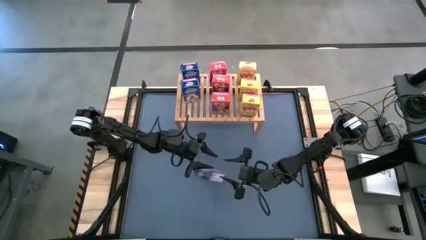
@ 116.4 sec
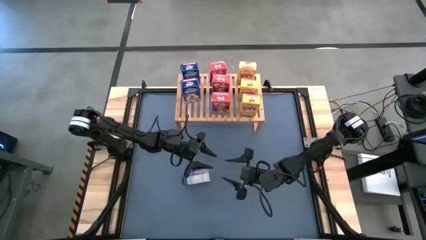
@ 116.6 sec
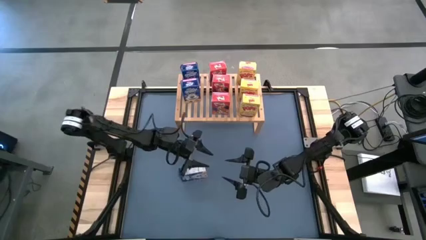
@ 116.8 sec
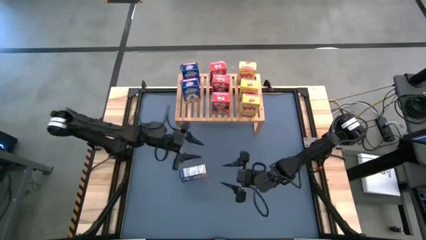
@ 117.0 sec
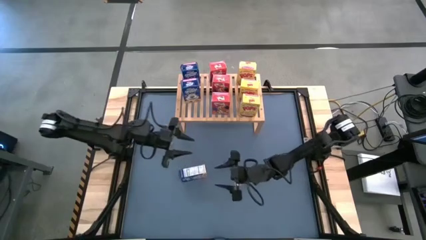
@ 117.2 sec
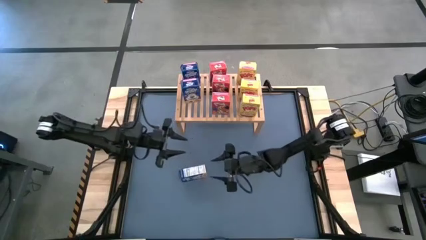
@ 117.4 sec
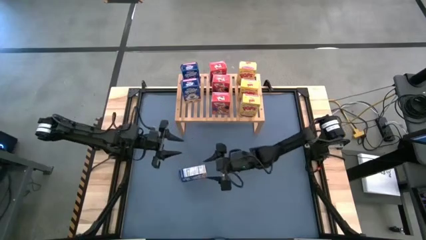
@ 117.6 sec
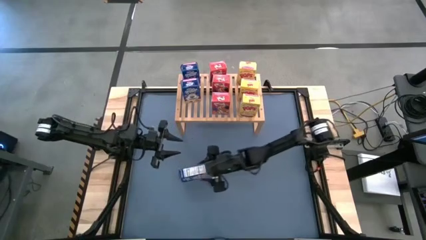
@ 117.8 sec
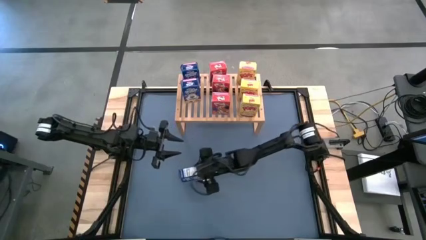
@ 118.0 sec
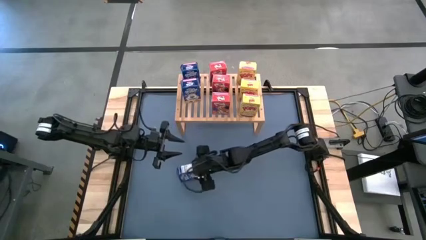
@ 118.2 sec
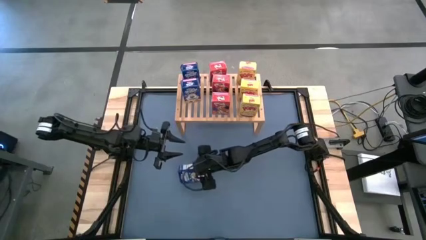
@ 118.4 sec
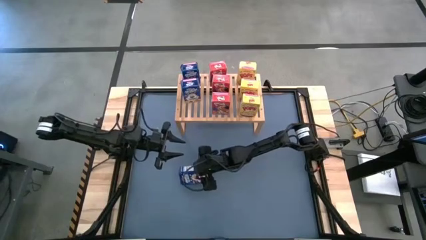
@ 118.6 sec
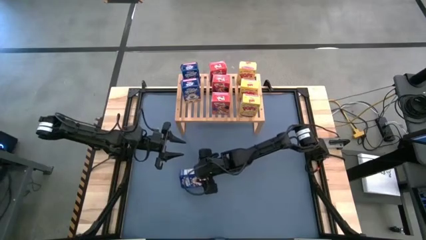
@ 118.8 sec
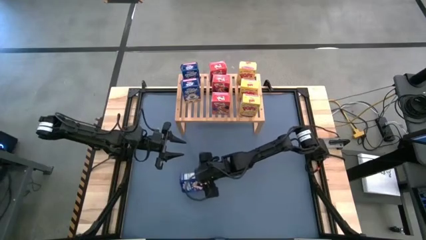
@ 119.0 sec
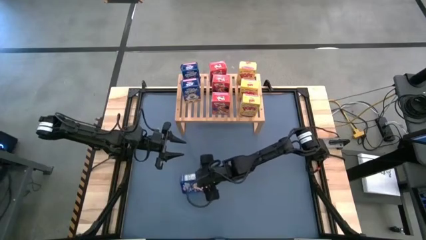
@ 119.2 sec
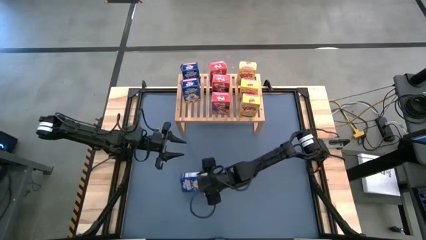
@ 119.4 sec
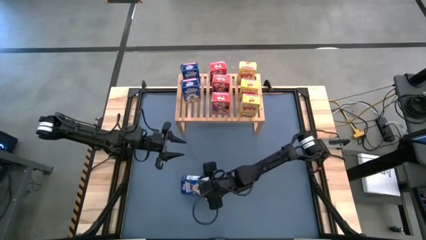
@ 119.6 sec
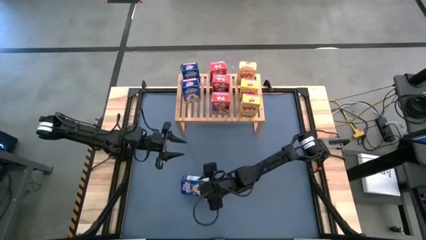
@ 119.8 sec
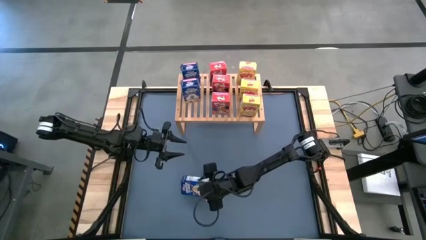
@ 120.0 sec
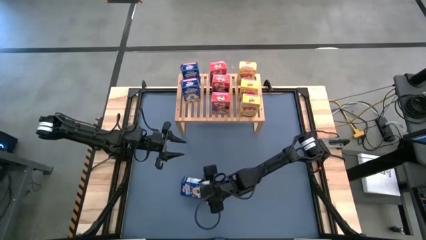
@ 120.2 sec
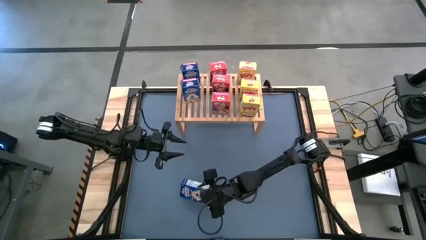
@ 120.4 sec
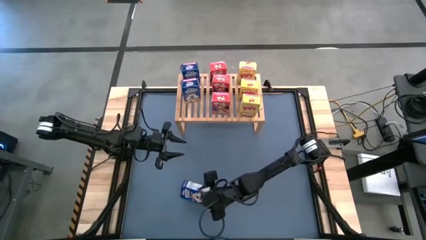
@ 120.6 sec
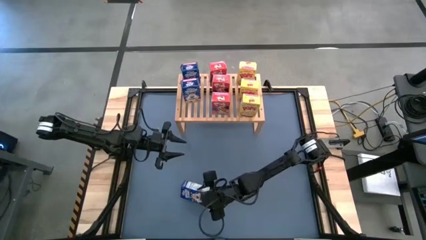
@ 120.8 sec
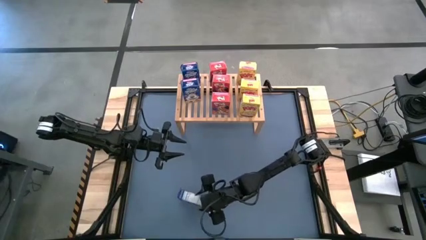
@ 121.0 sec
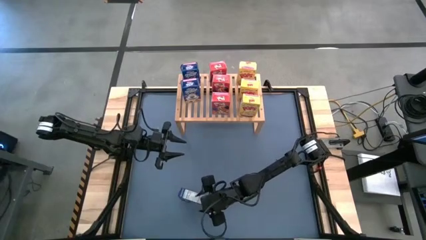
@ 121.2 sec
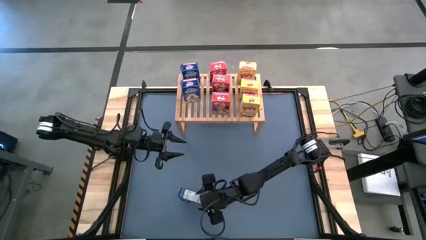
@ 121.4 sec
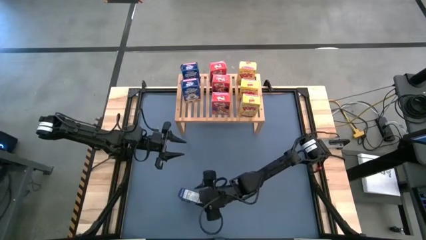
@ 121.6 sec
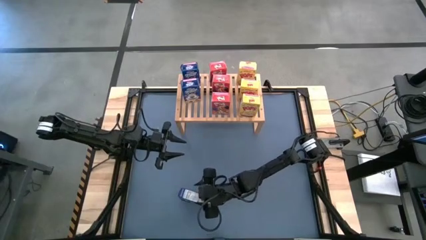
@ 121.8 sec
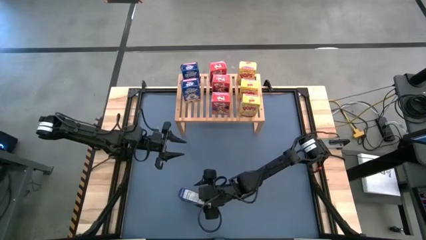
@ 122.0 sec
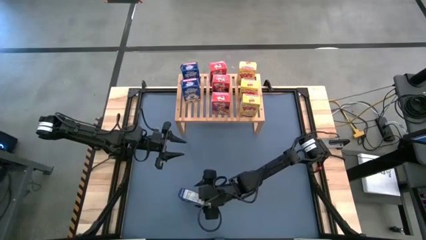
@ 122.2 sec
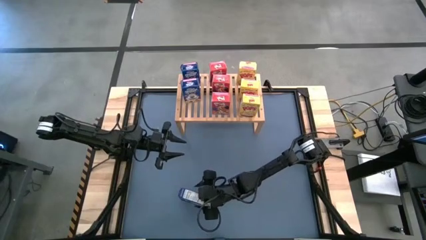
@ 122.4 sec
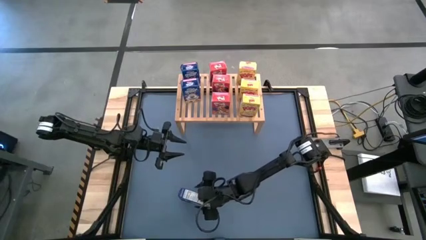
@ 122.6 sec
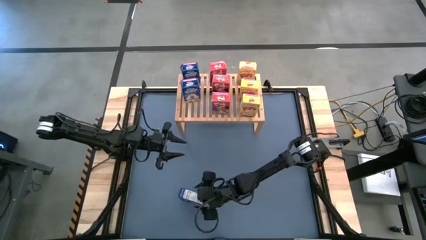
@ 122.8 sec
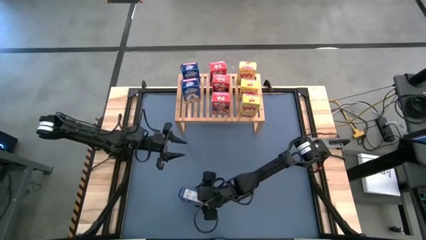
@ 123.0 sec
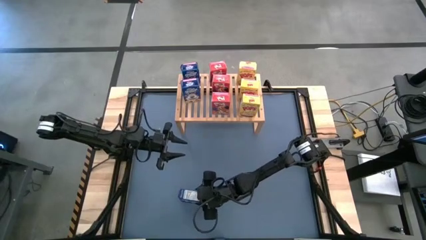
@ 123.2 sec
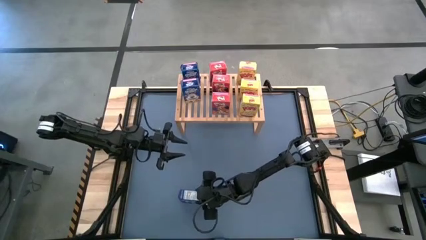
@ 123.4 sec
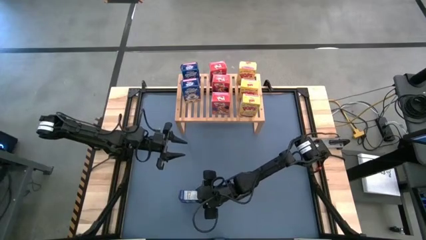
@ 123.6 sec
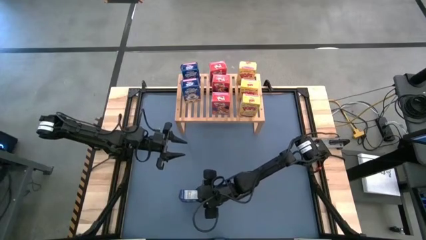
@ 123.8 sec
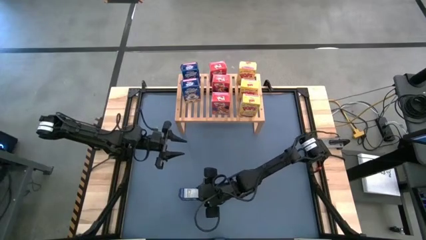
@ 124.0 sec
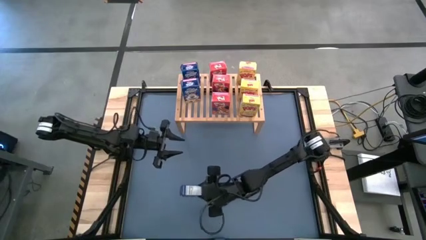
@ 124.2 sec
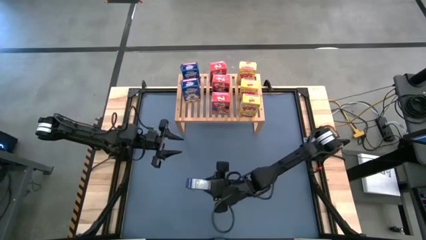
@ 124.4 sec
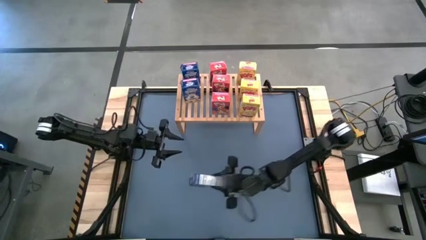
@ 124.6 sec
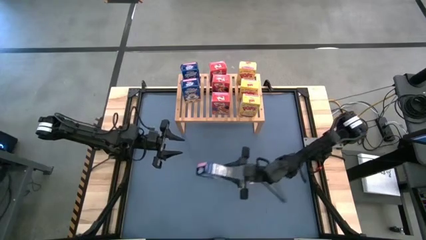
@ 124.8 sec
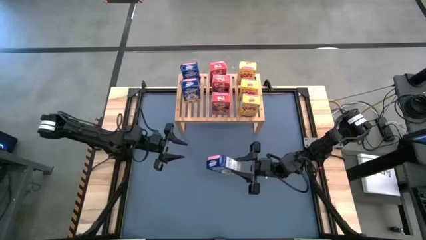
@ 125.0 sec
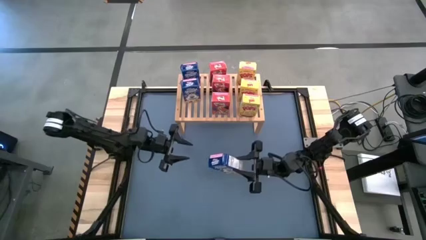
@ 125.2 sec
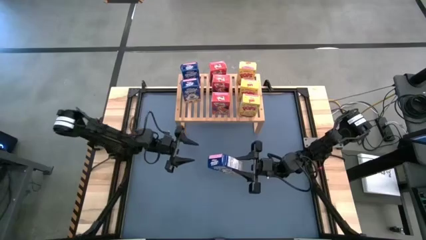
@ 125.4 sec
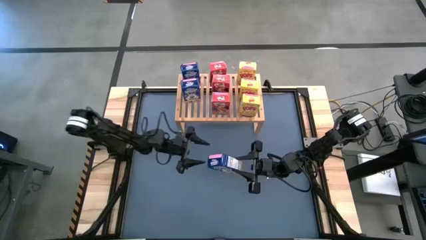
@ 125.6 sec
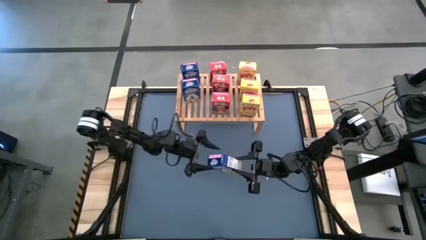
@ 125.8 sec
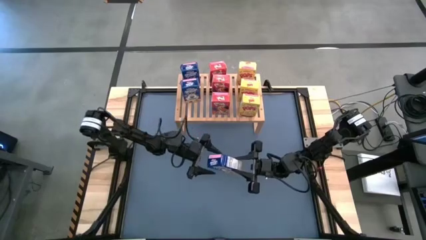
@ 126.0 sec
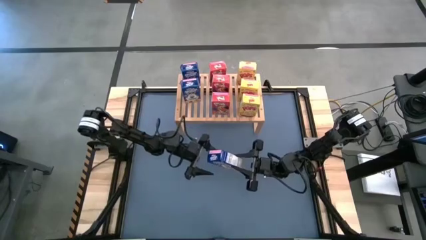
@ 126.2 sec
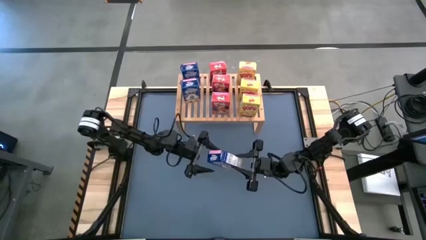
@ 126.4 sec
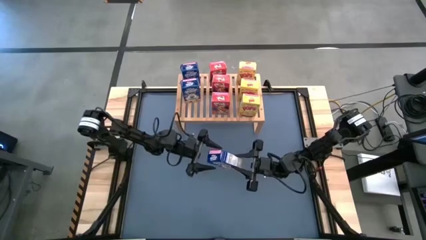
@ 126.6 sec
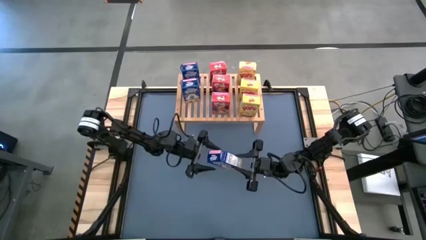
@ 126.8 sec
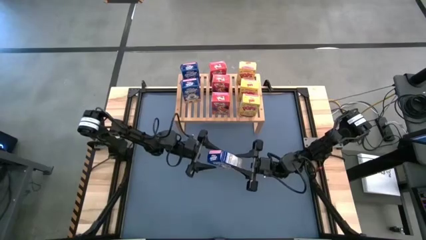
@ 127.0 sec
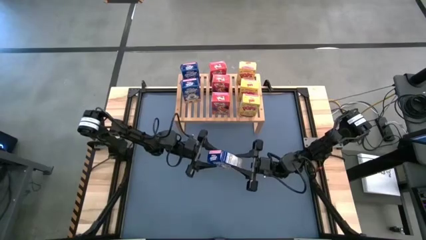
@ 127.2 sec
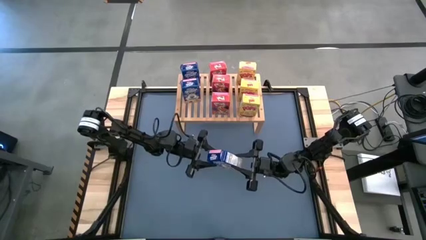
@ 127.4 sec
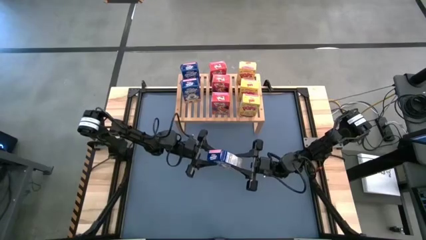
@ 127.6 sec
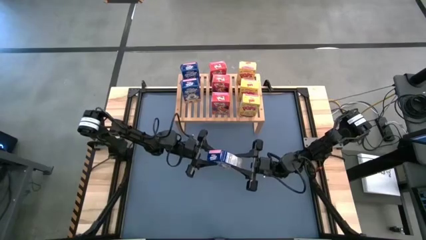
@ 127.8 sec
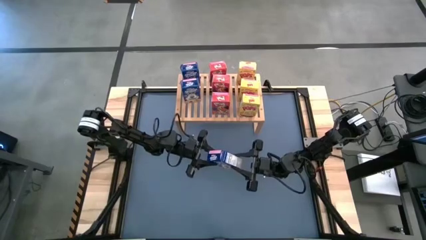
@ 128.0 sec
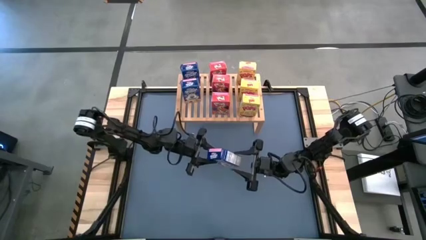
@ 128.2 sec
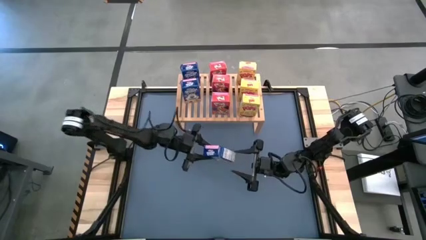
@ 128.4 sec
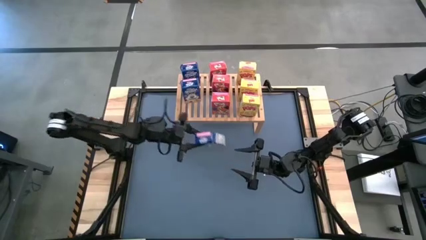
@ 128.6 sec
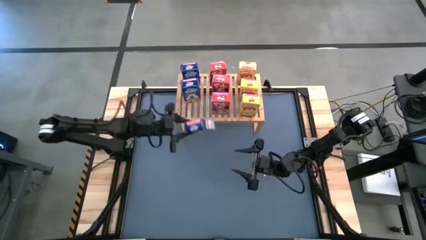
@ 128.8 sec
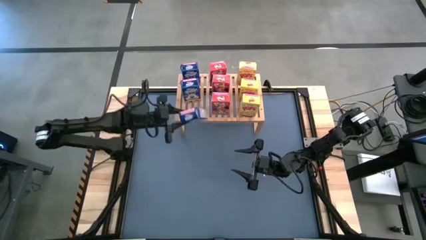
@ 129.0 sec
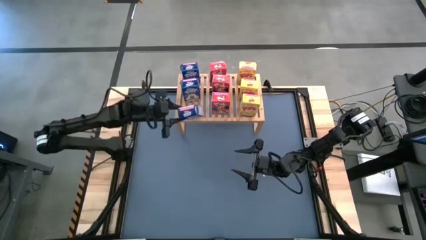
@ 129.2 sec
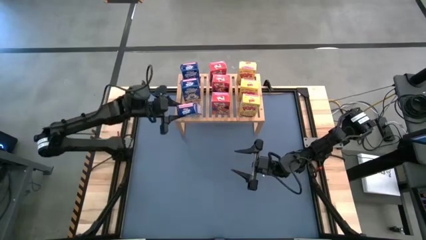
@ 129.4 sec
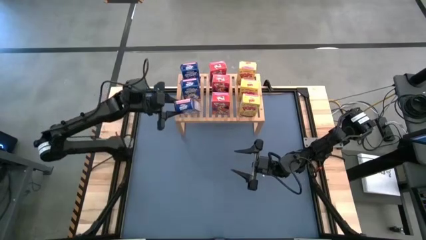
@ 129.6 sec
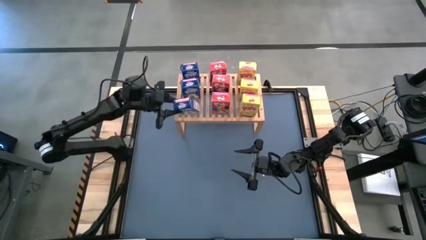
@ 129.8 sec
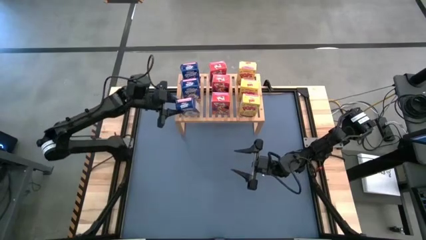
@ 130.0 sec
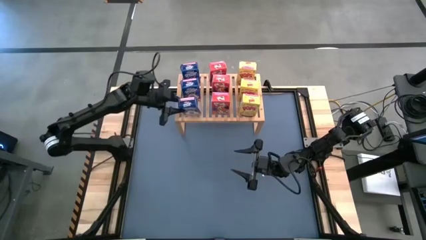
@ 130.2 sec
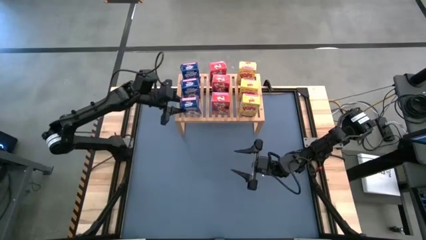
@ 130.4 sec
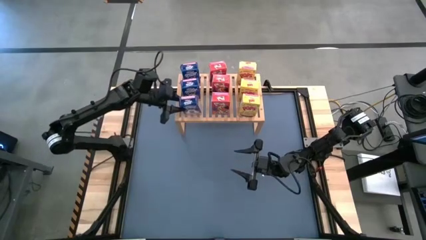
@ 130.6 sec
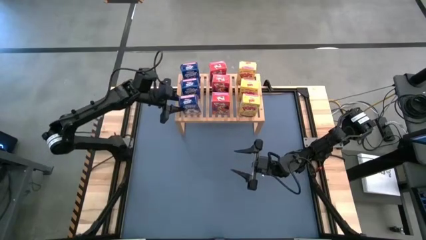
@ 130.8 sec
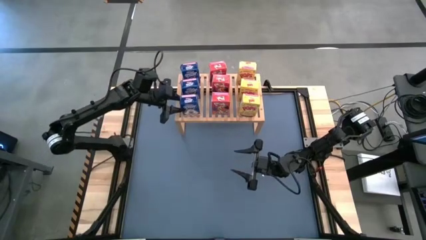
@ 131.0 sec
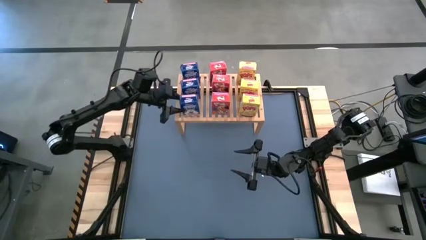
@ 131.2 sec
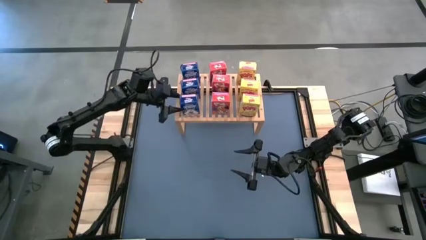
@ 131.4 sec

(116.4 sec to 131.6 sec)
Task: Stack cereal on shelf
Put the blue cereal box on the shelf aligned with the other blue cereal boxes
